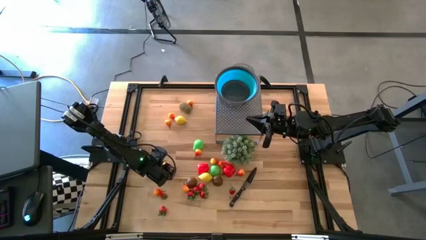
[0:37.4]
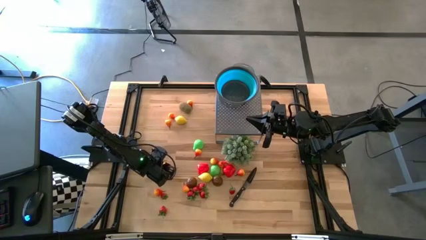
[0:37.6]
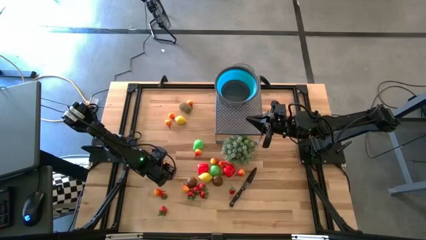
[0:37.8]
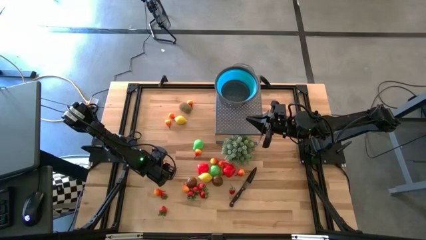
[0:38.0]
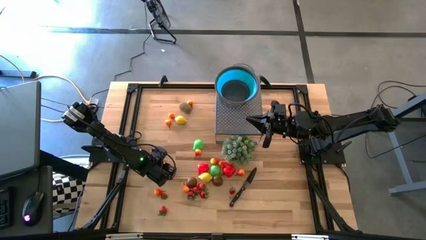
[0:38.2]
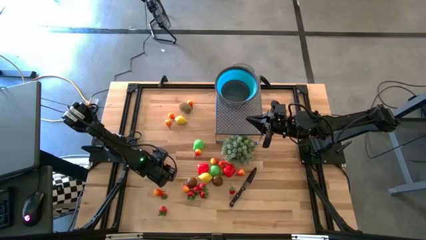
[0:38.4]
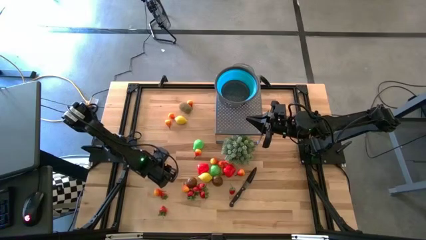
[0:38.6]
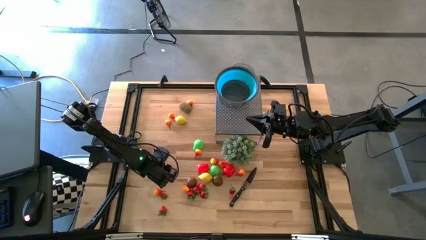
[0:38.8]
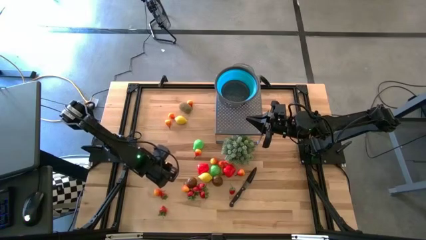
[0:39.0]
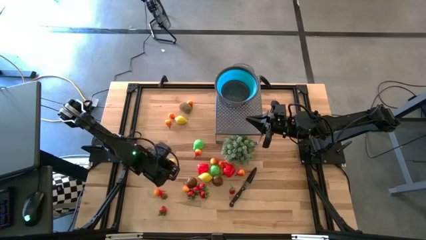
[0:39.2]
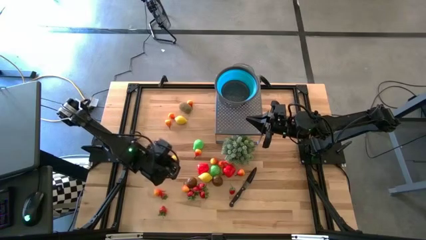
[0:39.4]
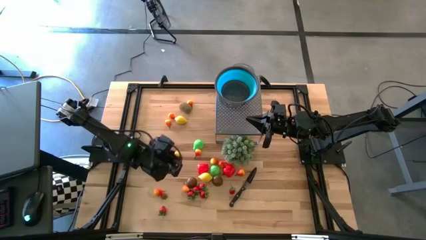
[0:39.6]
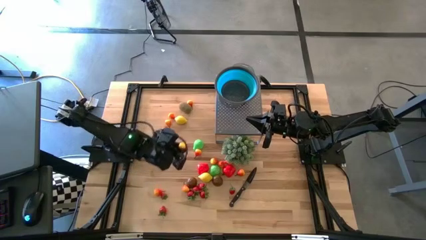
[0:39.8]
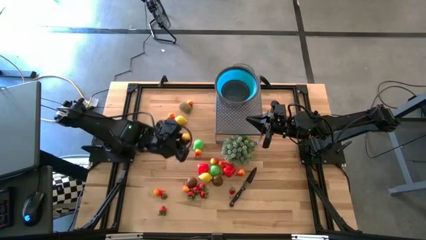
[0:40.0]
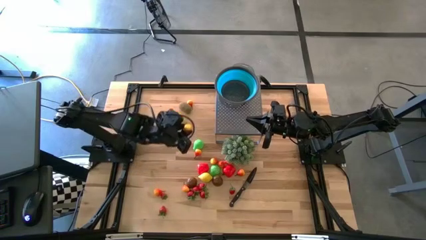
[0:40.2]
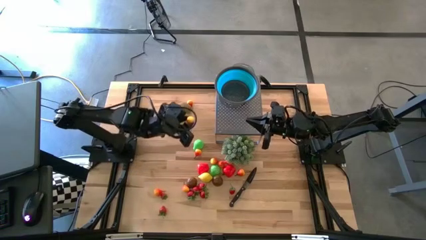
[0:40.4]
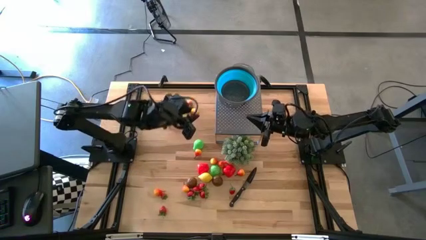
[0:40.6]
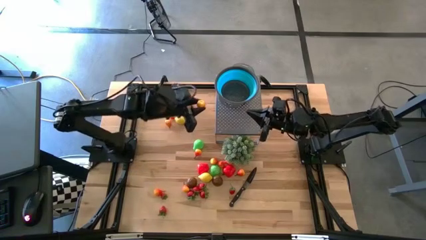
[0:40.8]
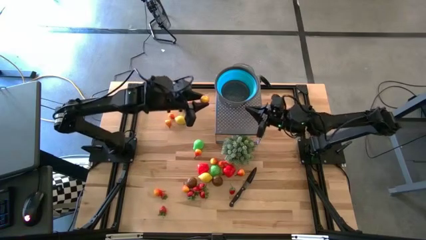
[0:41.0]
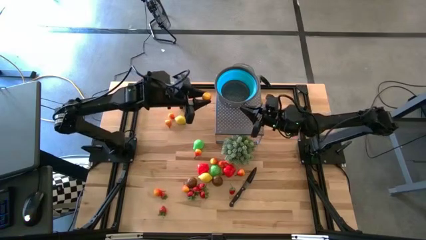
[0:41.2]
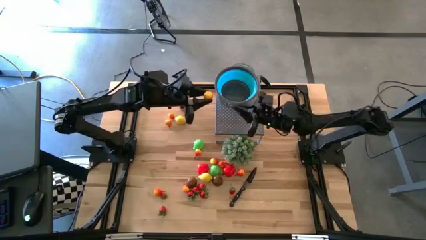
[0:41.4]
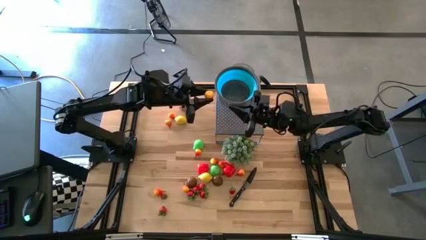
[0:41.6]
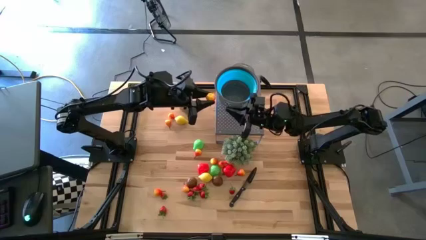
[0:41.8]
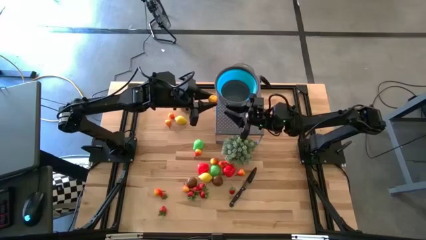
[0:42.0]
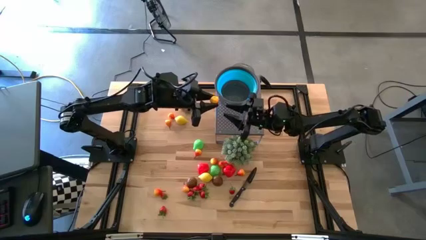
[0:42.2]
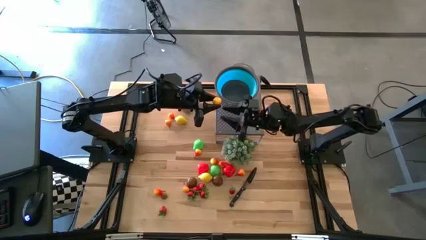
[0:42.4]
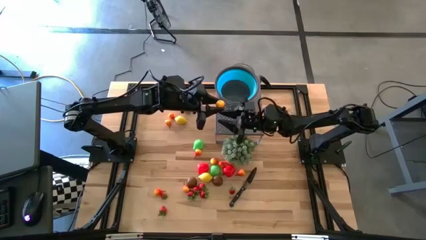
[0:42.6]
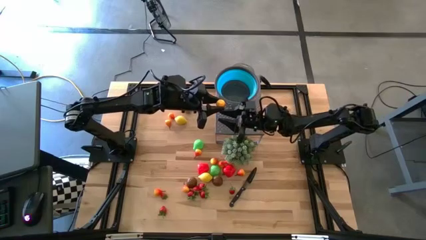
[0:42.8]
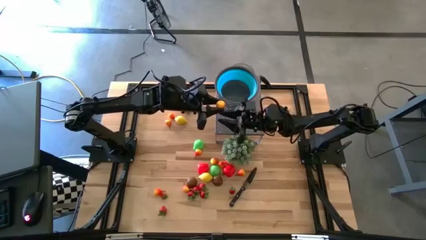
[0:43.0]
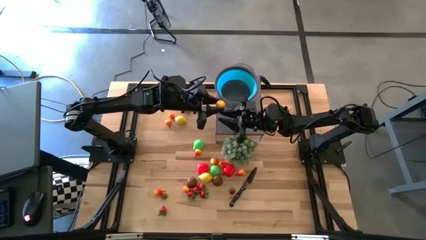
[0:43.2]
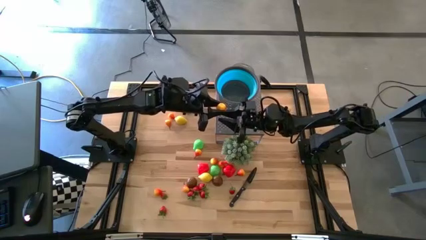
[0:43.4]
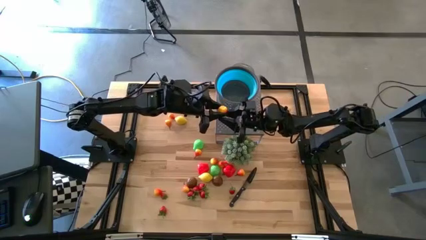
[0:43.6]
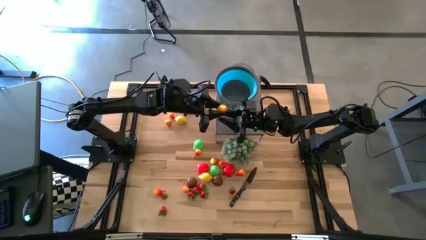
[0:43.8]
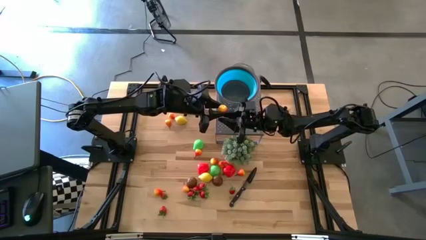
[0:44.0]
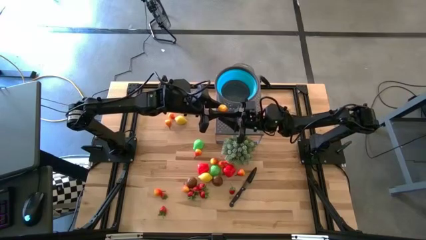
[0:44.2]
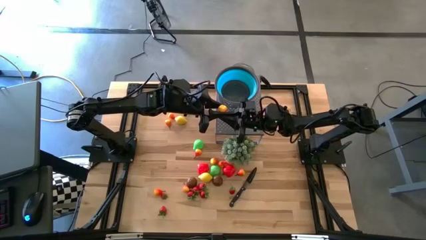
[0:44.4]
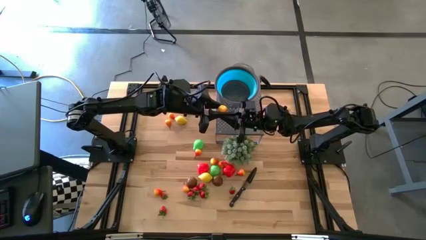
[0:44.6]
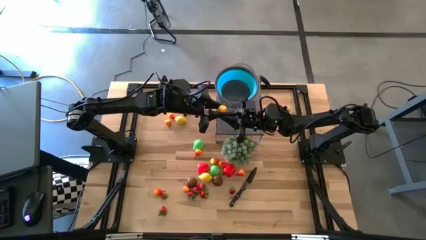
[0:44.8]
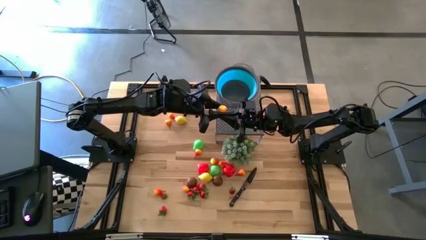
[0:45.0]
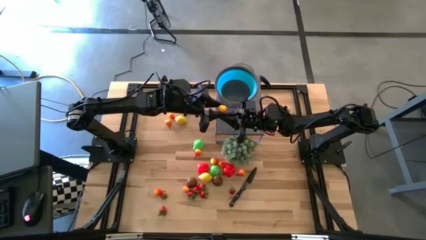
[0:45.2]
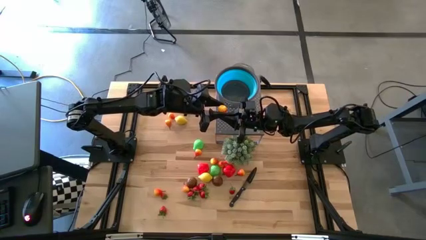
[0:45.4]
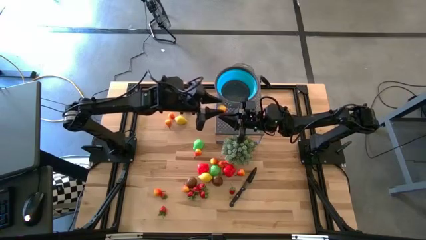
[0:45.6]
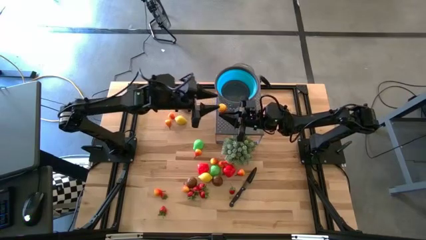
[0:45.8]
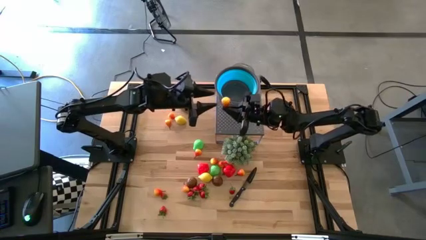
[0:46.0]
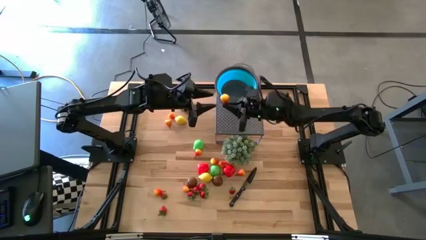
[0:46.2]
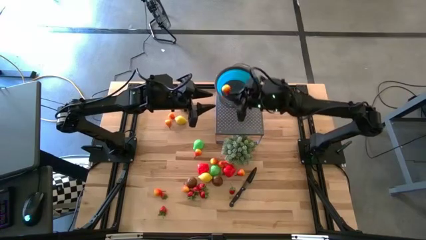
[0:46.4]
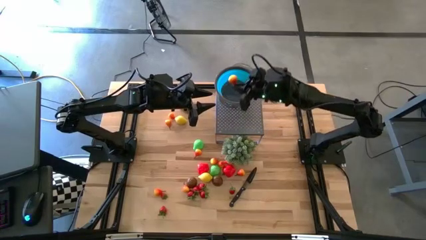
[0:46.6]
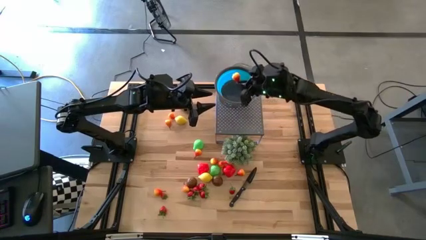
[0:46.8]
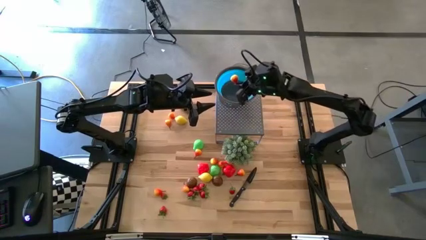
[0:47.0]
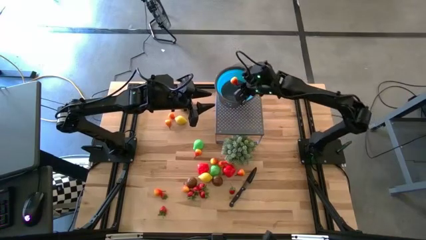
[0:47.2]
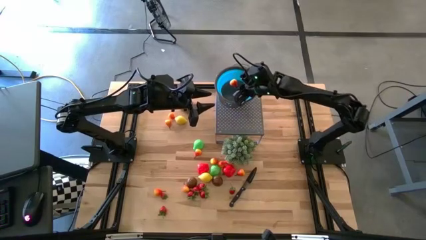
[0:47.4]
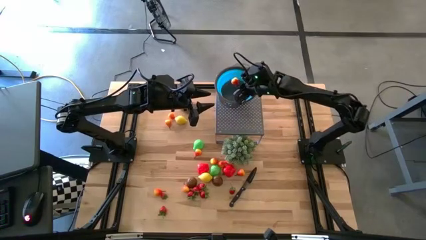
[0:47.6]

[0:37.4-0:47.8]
Task: Pick & Place Fruit
Put the orange pear into the blue strainer bowl

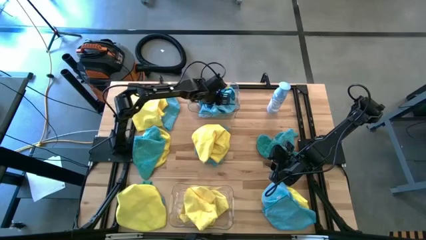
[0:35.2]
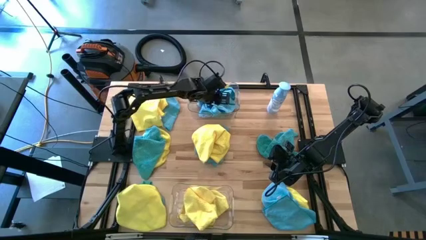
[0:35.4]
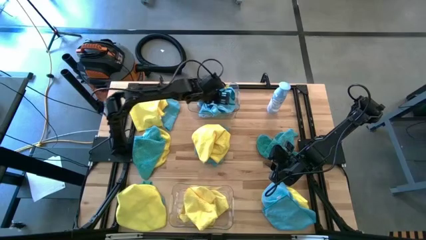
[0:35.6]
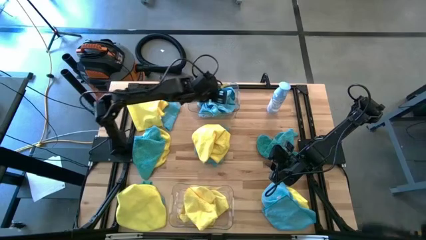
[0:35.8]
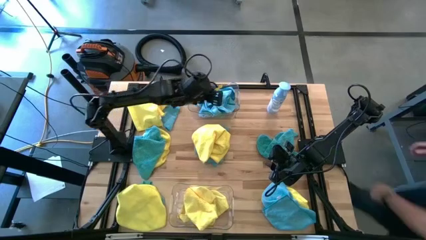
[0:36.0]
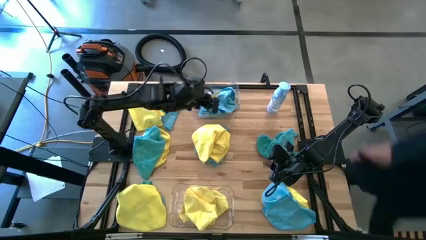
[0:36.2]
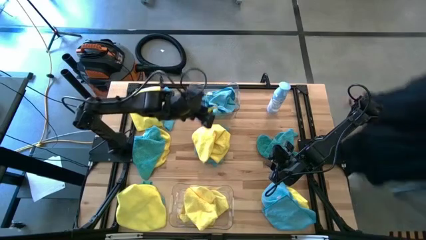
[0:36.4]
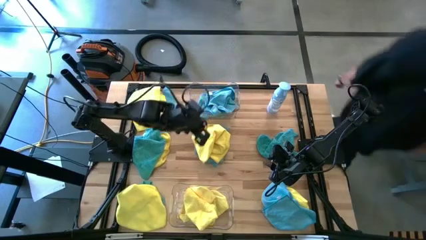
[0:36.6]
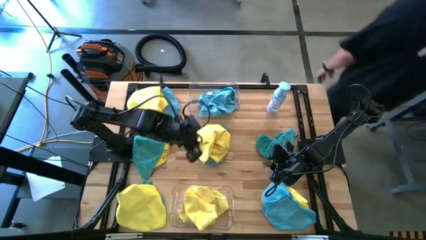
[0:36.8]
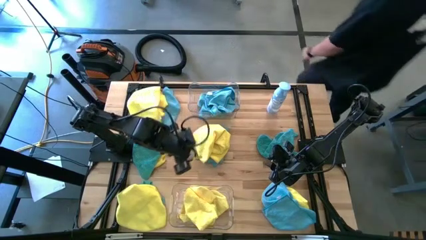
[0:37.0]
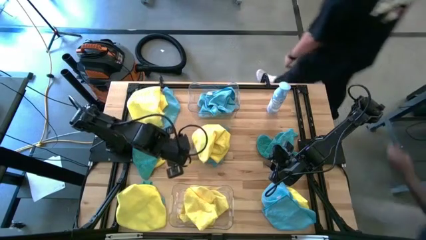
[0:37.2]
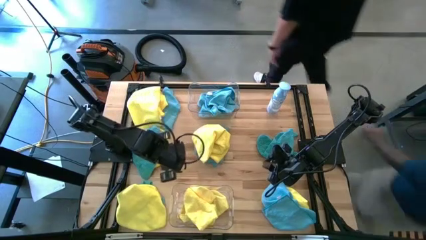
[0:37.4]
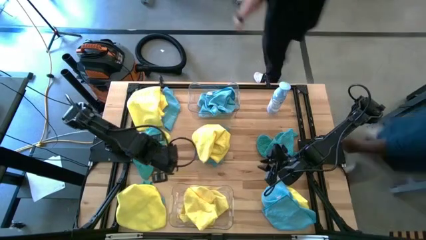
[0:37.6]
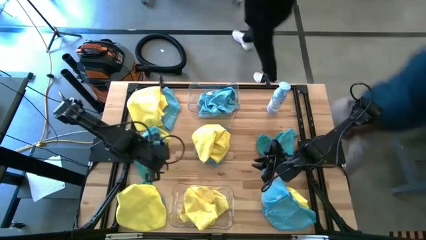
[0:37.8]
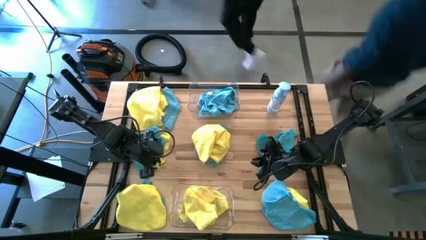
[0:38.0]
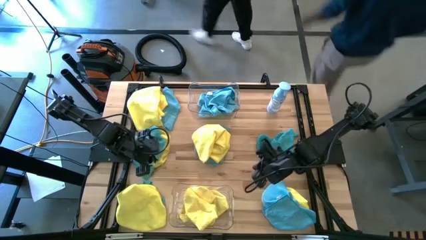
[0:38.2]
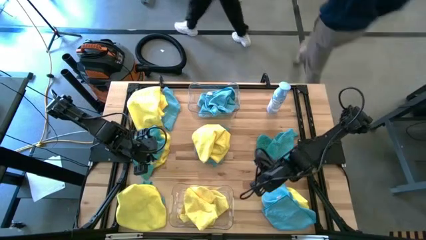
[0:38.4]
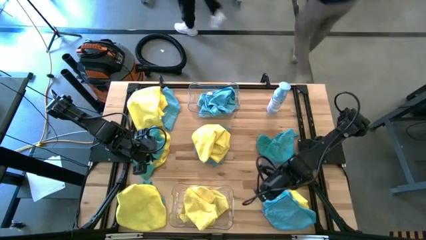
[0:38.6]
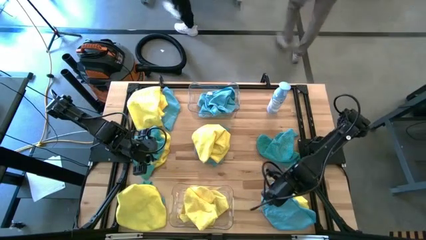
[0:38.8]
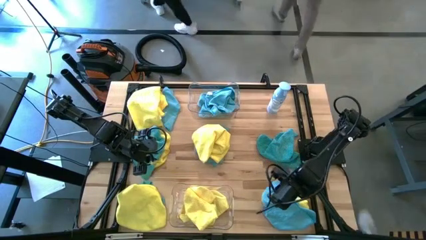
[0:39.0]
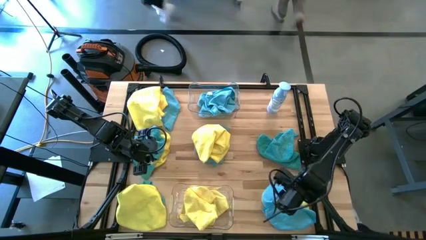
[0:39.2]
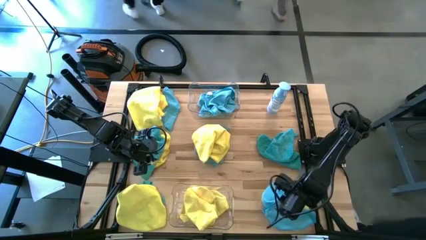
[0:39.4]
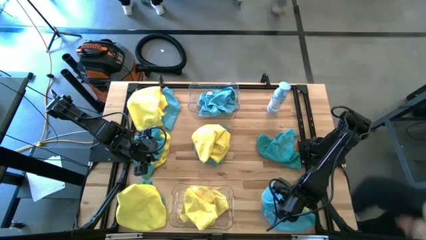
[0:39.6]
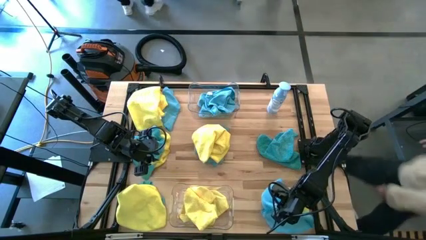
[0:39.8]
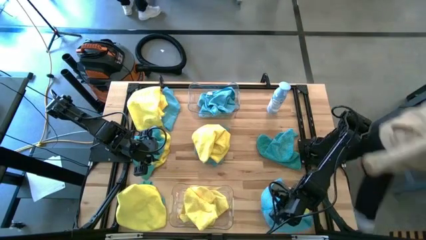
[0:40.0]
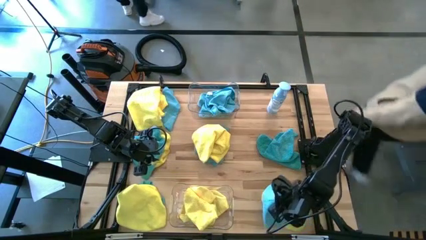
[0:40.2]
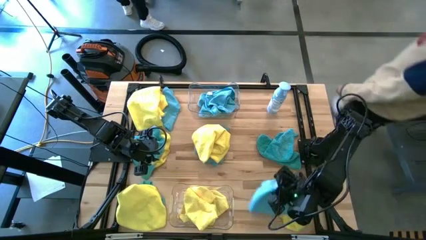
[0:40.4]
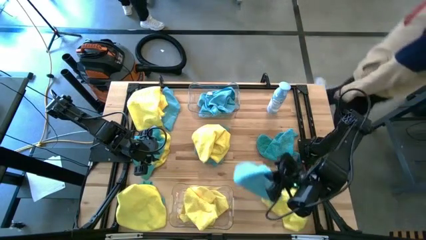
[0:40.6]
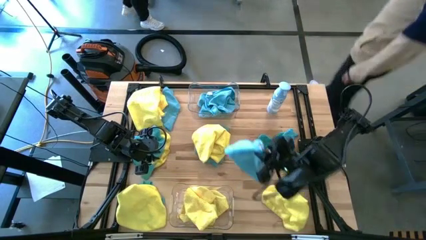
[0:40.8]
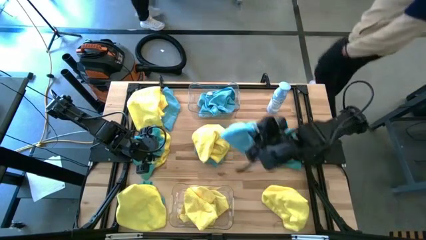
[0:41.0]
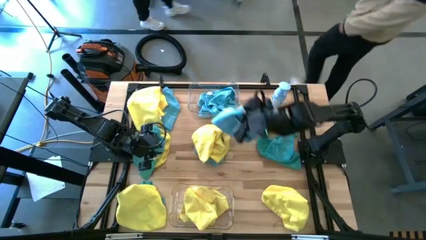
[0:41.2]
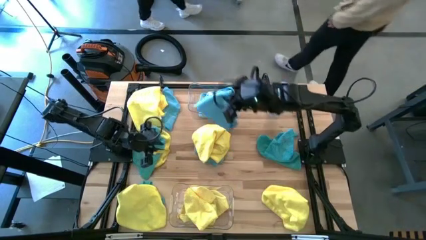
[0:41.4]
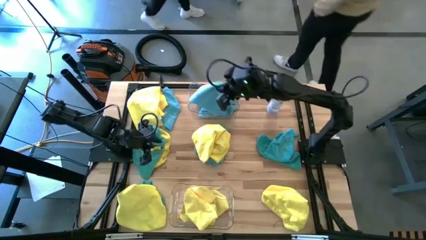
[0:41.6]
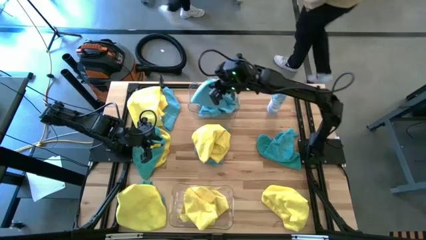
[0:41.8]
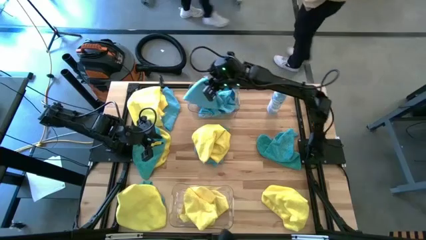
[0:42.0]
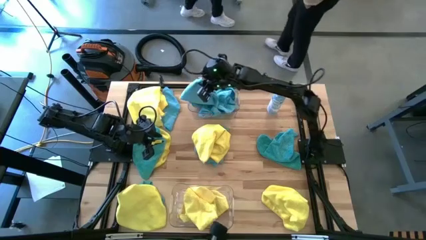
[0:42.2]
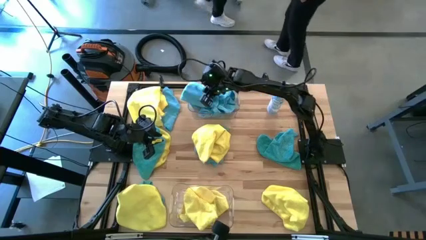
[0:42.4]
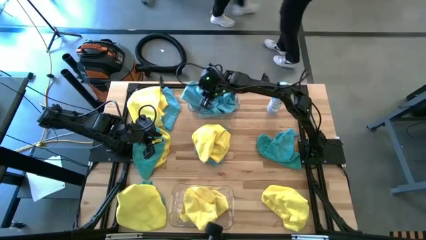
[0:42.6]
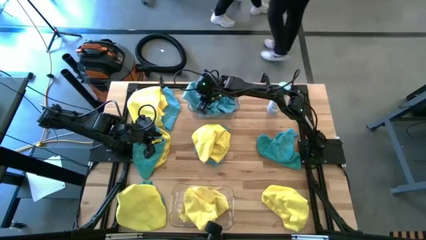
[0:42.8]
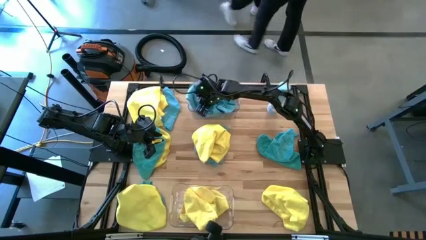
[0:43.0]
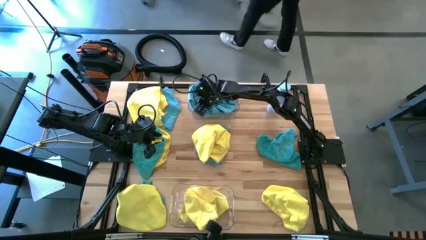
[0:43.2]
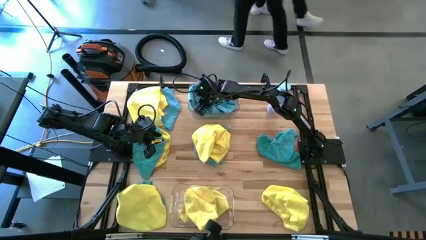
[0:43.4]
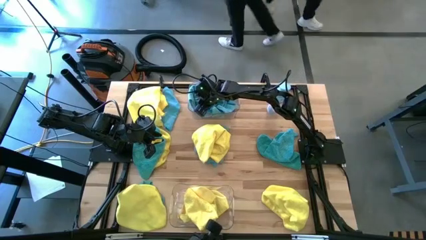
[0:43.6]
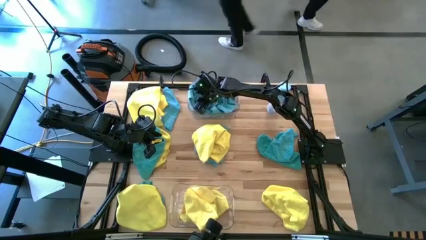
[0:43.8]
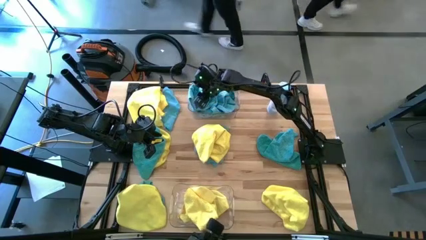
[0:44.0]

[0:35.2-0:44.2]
Task: Sort microfiber towel by color & place in baskets
Put the blue microfiber towel into the top transparent bin
